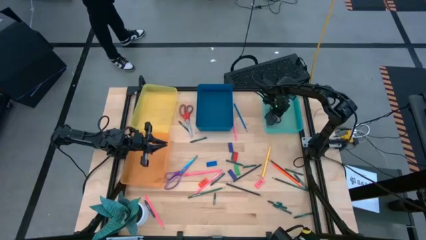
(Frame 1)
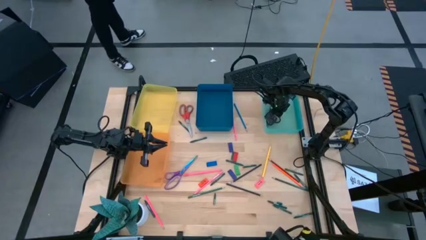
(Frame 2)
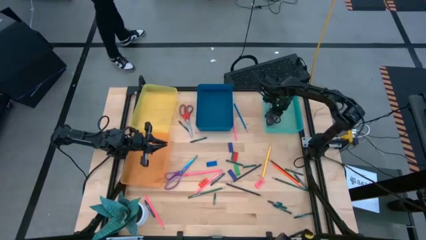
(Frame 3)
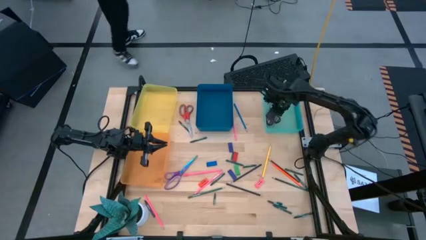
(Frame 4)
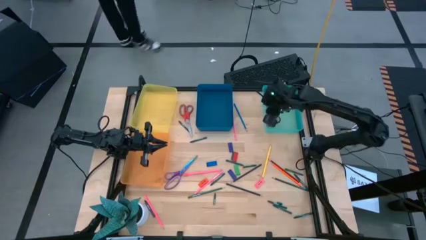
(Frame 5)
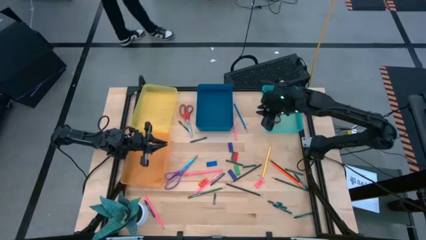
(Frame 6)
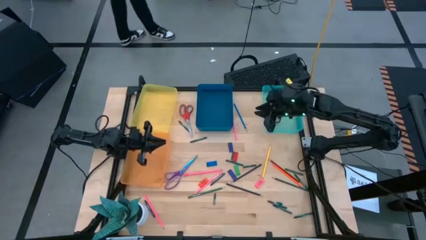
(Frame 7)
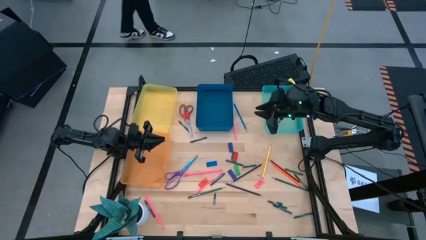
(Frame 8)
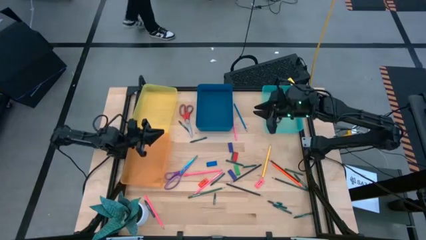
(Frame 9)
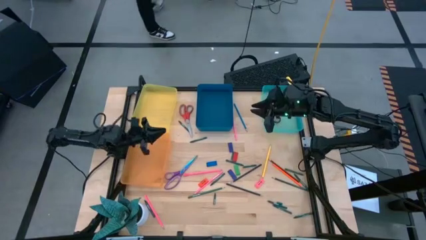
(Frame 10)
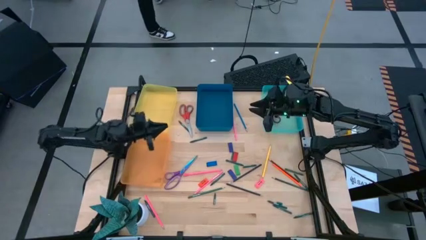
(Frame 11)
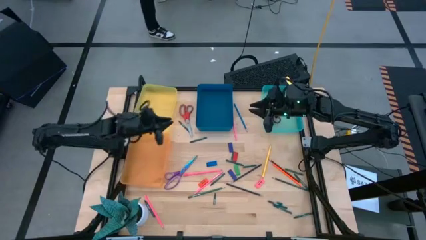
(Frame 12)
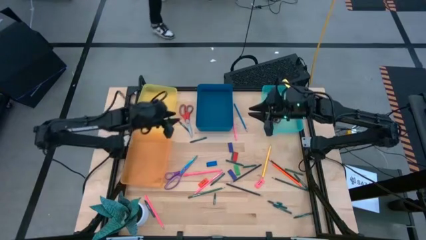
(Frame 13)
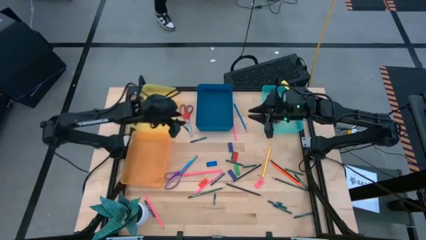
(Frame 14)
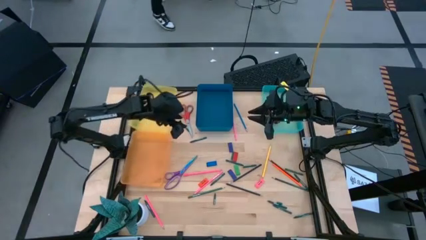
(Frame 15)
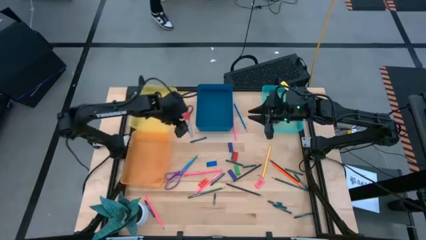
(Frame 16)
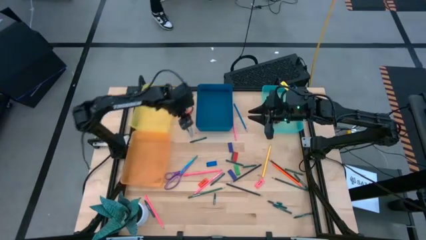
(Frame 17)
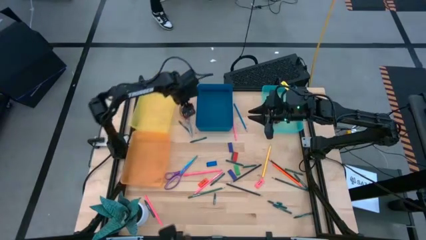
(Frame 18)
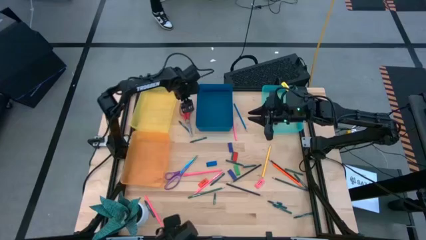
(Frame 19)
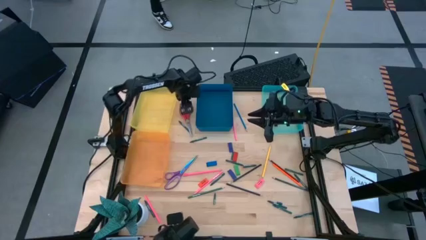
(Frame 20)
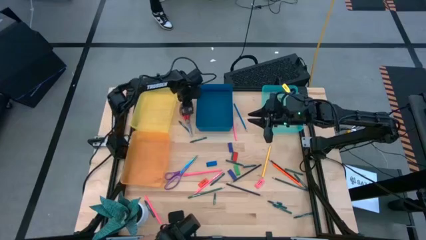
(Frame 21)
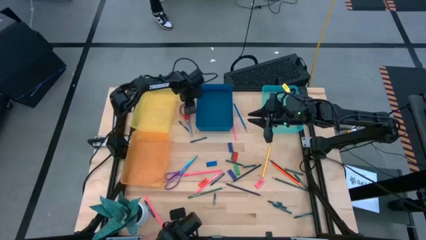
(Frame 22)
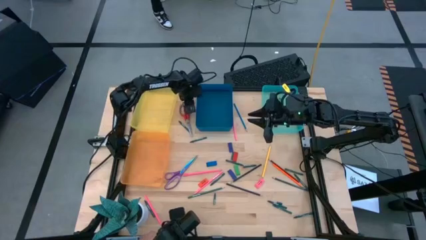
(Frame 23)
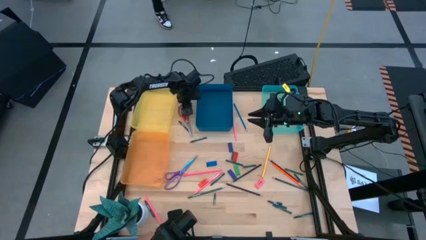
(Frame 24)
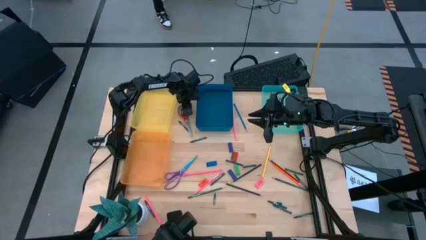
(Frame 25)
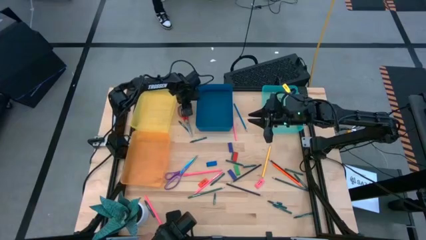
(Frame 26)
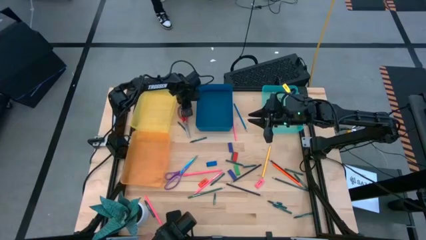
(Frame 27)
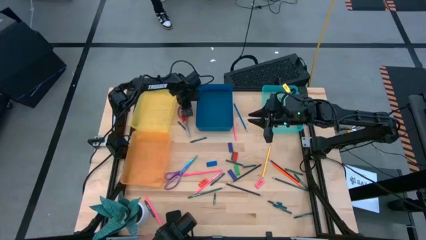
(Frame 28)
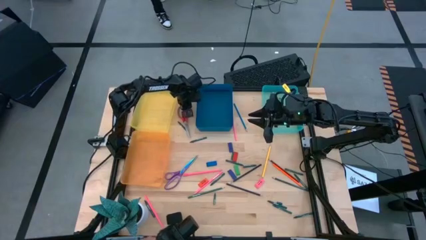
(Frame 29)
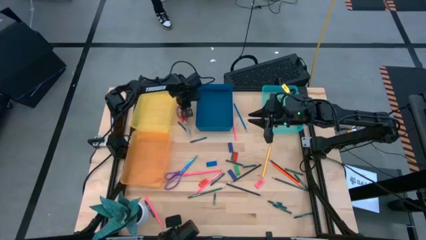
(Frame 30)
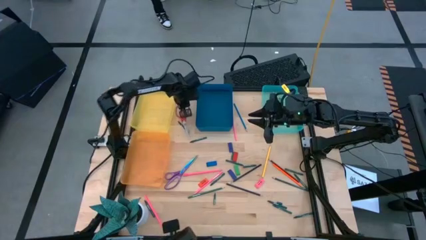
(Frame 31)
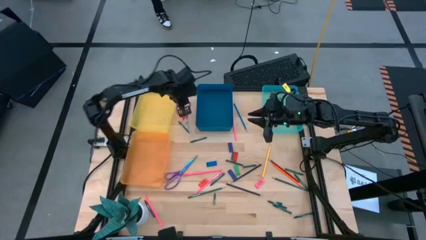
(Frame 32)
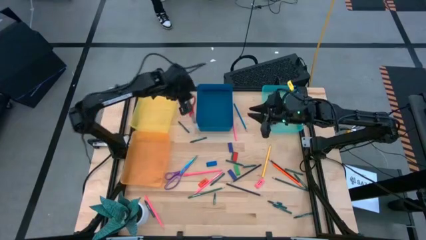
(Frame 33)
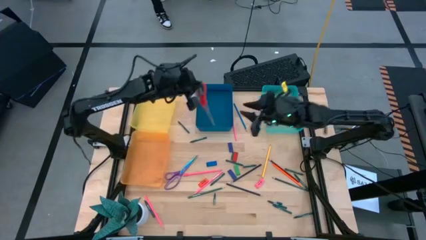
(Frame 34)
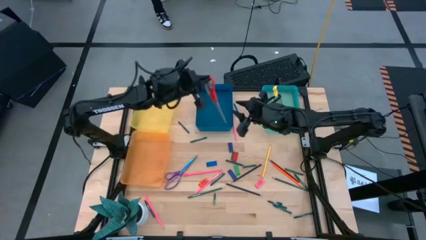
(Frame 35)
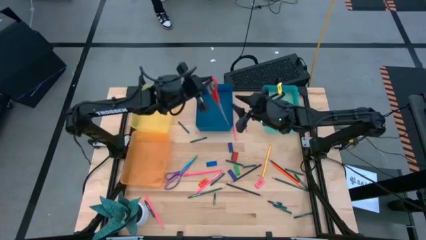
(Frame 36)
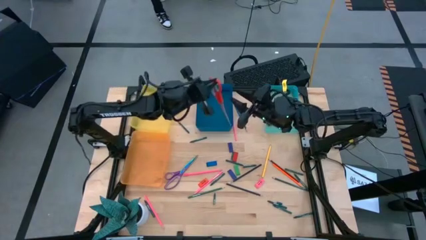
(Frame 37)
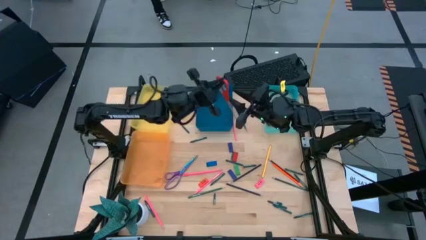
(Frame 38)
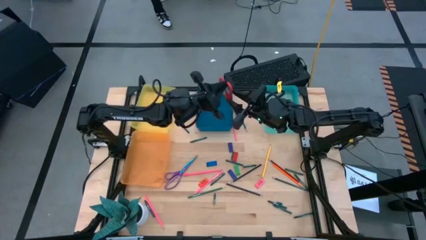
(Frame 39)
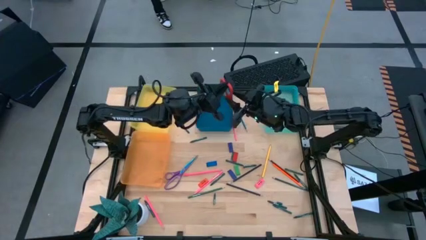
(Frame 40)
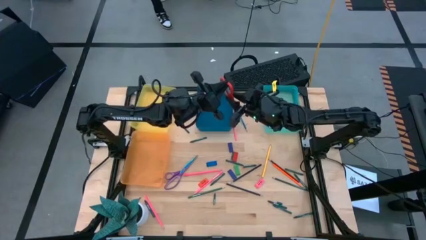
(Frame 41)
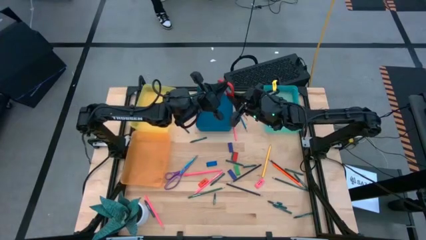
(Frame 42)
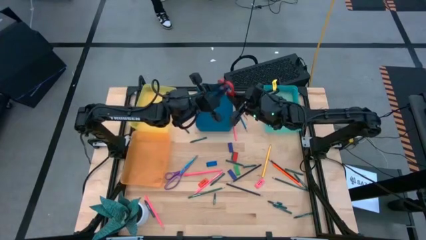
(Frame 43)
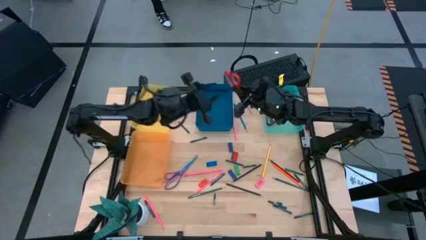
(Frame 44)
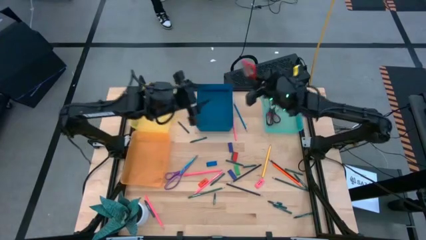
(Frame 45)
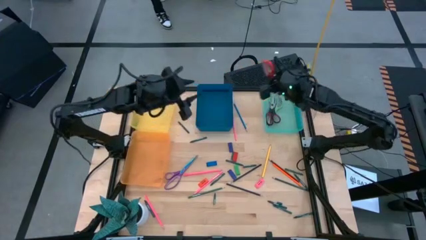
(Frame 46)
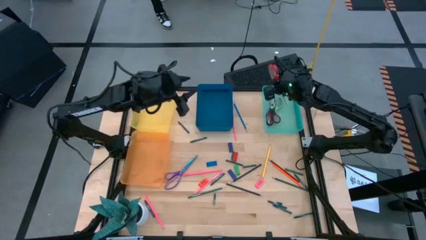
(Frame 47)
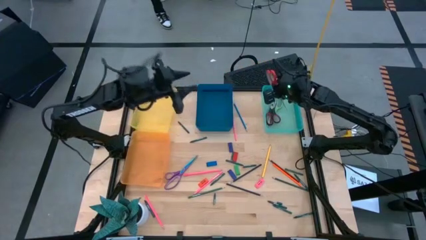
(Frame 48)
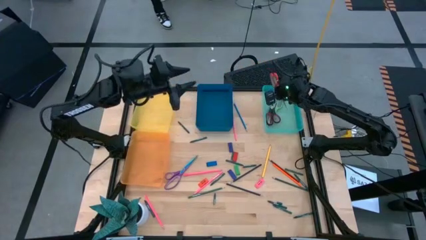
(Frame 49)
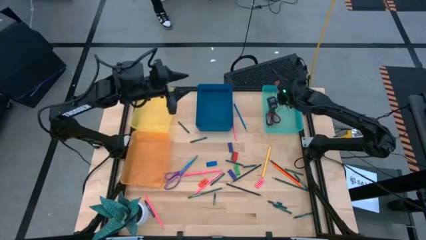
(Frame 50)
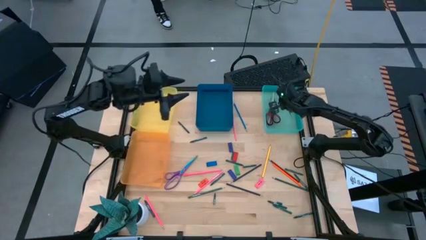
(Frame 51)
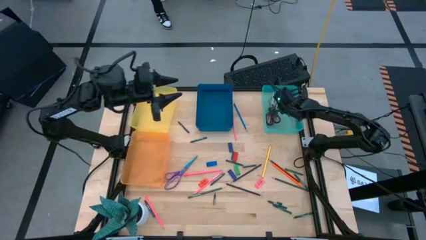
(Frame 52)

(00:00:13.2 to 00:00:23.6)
Task: Sort crayons/erasers/pens/pencils in bins
Put the red scissors into the light blue bin

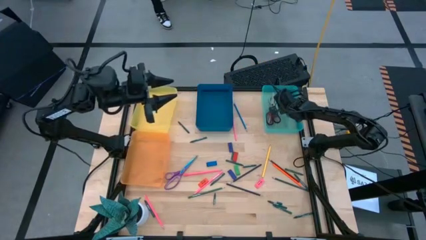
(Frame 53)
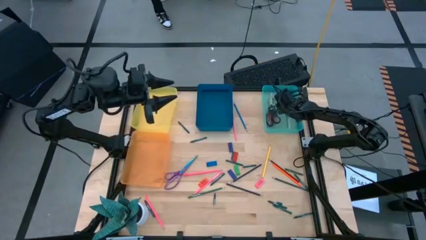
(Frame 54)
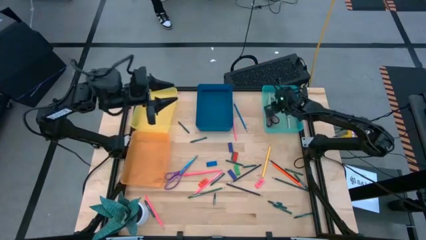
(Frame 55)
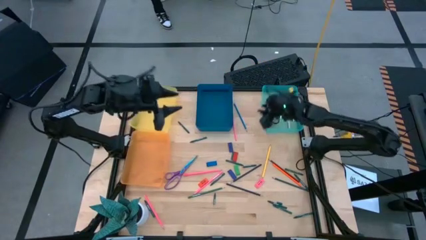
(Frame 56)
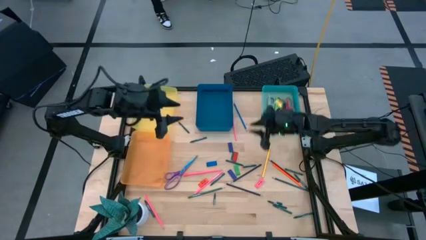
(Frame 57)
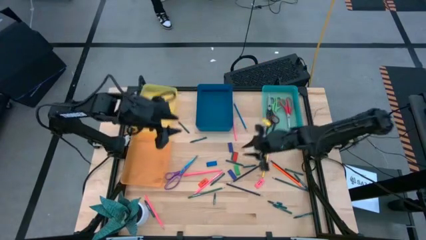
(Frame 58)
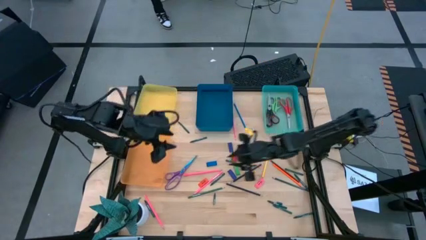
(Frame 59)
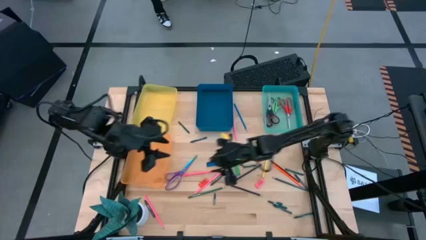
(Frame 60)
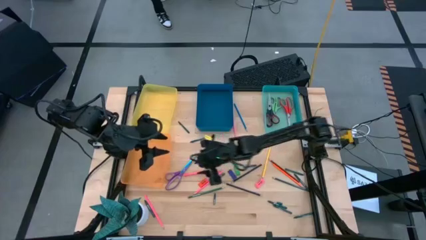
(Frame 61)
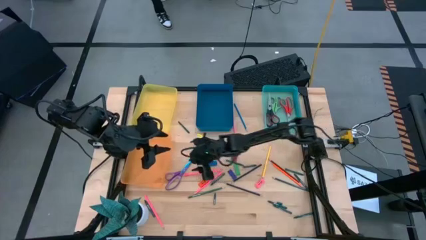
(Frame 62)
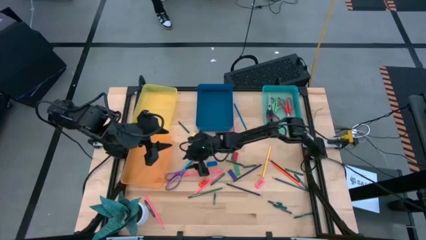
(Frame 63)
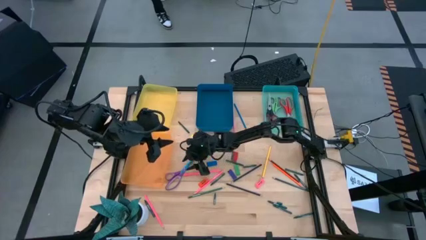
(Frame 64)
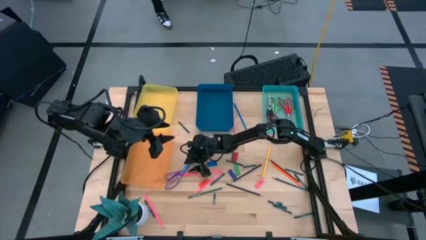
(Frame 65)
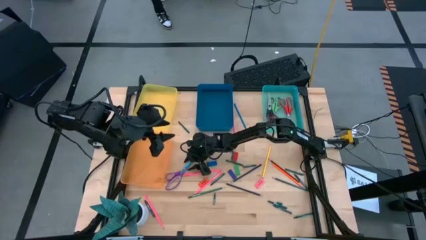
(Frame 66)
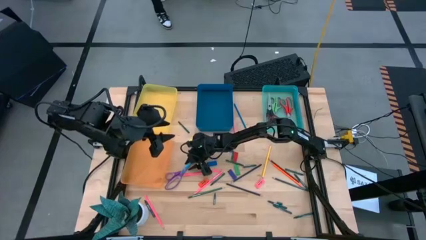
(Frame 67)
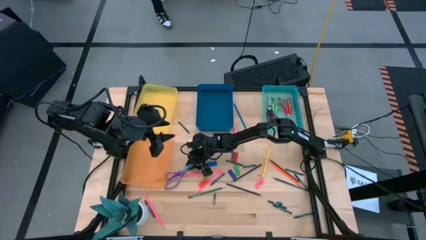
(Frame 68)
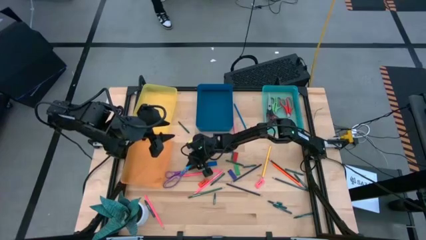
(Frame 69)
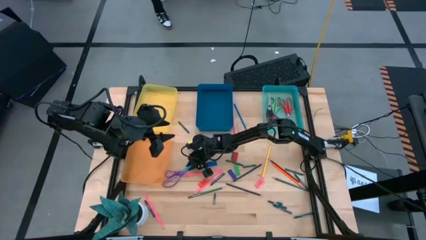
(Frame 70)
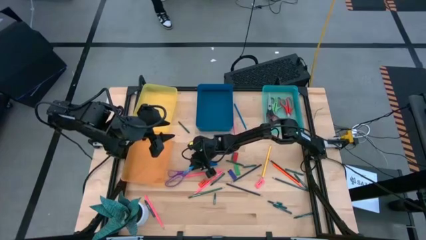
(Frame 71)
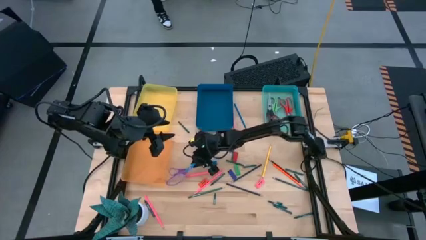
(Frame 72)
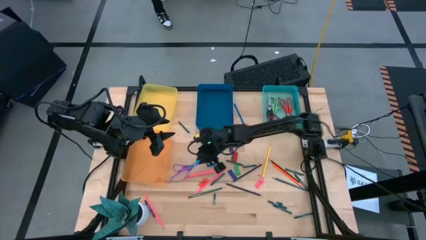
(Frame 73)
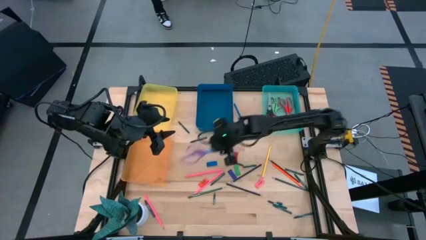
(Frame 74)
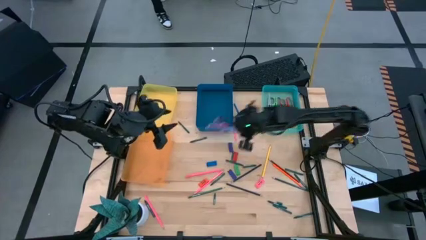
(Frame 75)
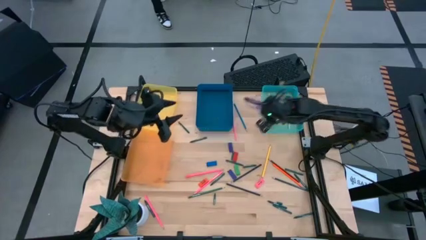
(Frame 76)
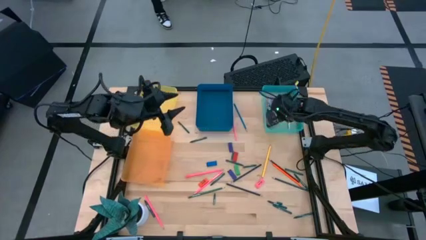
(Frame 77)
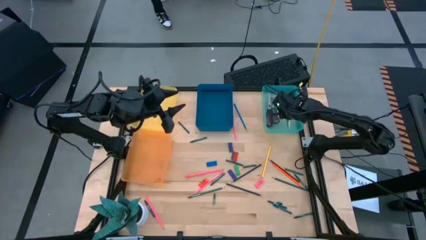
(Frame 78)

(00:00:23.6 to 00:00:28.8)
Put the purple scissors into the light blue bin

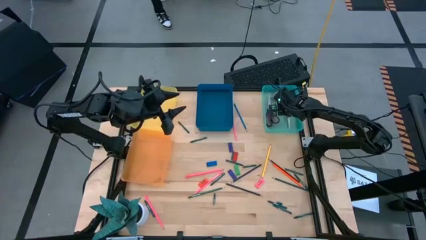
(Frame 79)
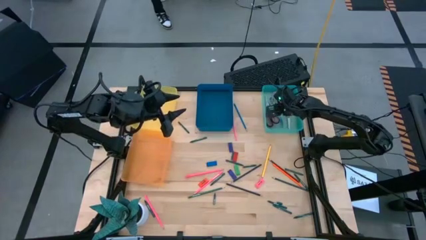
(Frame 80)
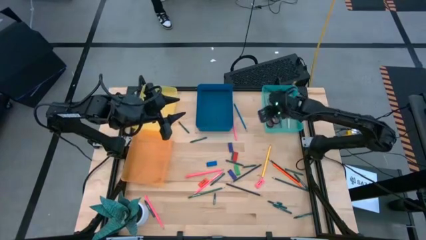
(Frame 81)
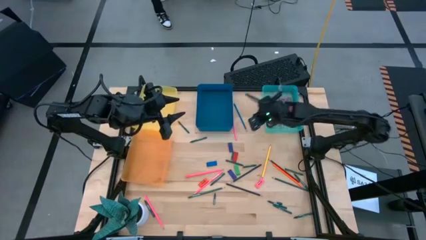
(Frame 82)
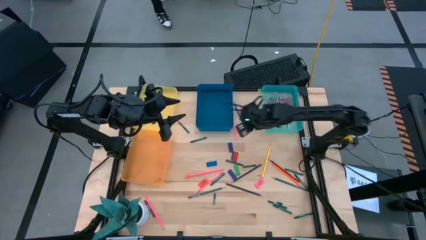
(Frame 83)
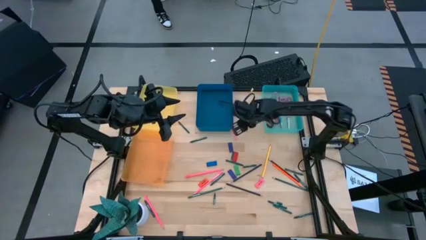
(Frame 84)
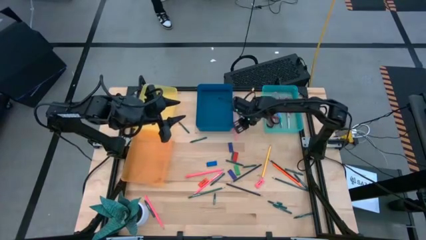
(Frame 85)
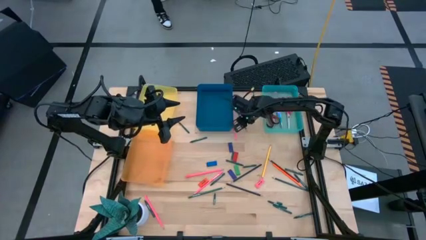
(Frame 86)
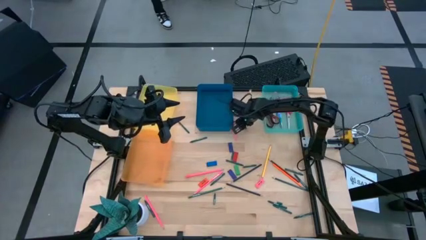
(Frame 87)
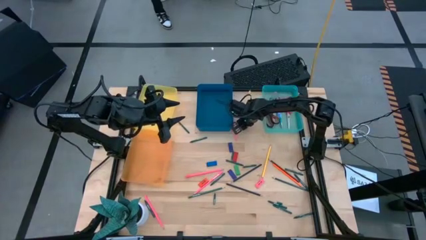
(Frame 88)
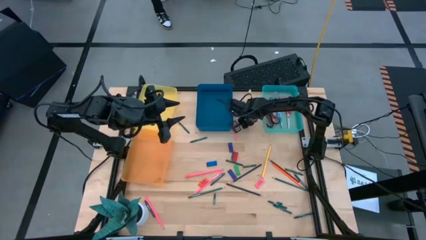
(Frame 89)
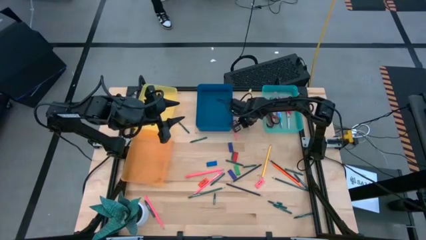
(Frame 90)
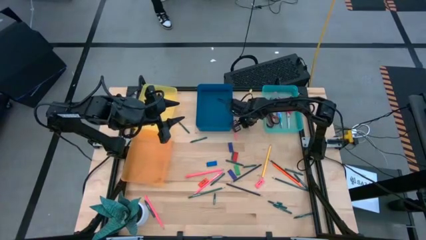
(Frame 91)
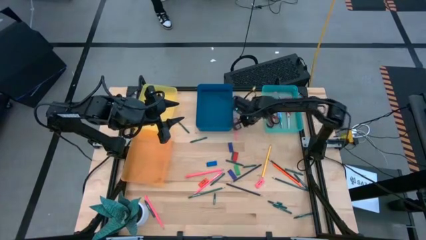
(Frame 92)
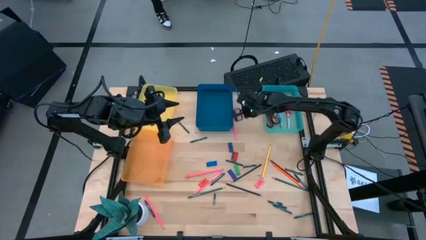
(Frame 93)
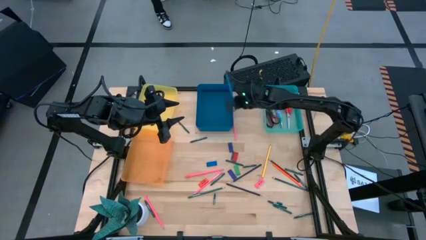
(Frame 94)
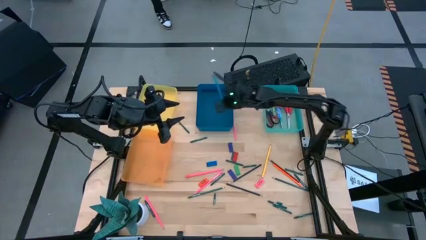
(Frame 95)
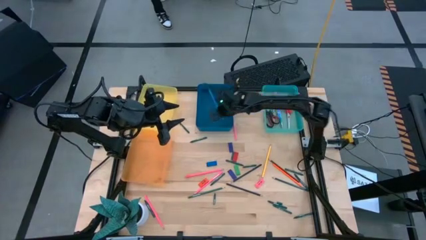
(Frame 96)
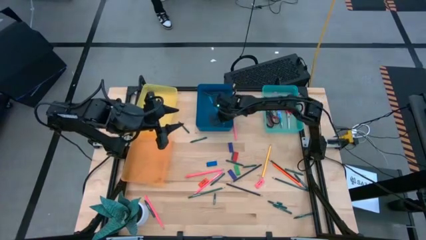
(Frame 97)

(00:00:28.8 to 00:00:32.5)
Put the light blue pencil into the blue bin
